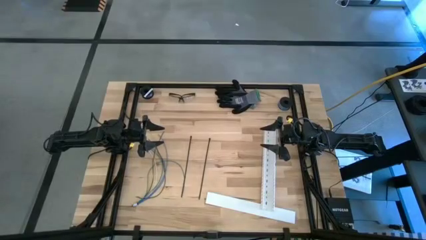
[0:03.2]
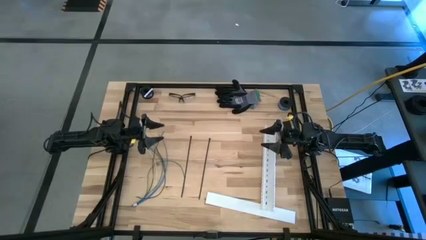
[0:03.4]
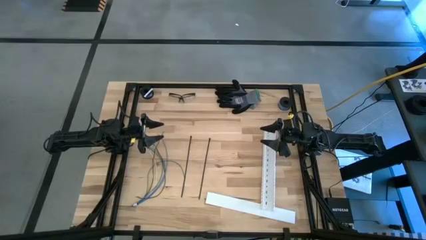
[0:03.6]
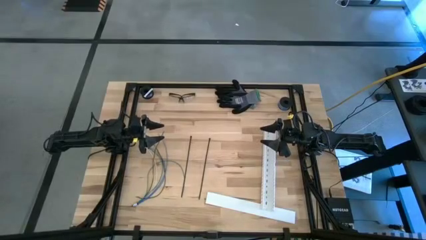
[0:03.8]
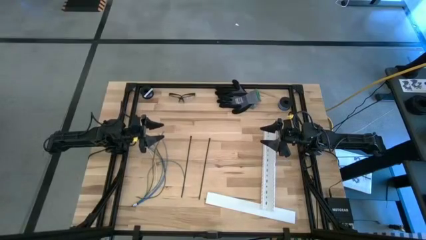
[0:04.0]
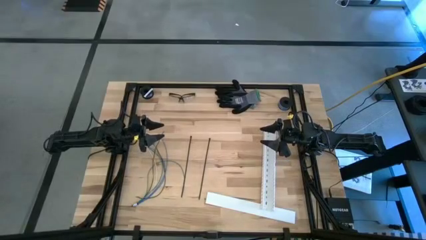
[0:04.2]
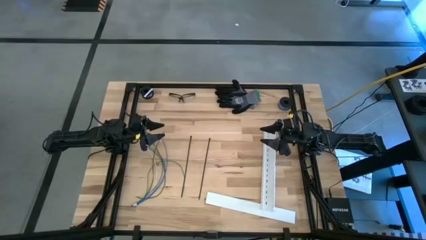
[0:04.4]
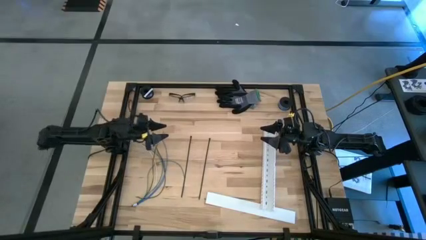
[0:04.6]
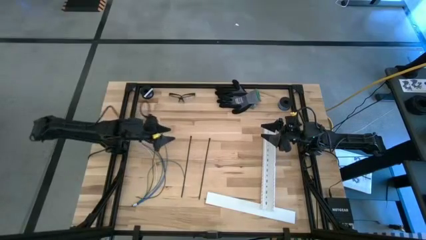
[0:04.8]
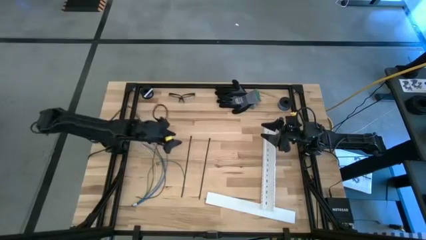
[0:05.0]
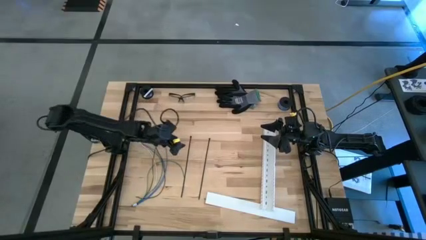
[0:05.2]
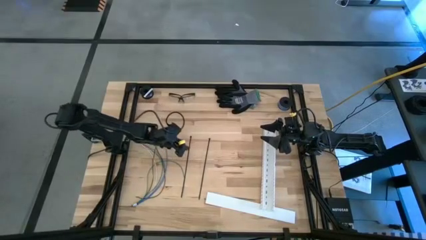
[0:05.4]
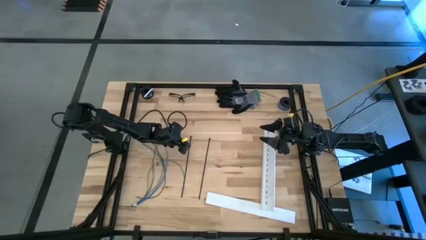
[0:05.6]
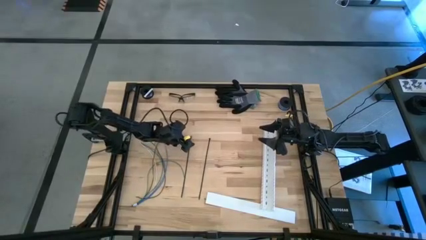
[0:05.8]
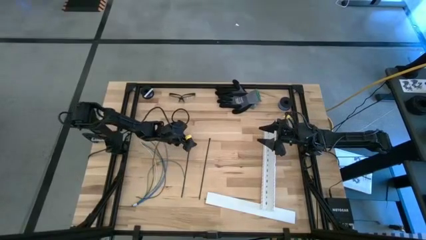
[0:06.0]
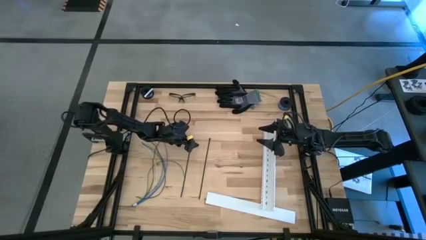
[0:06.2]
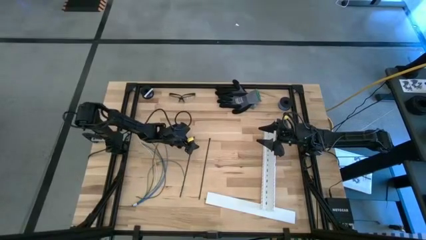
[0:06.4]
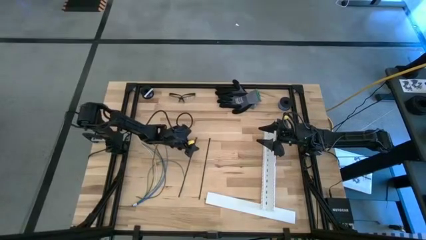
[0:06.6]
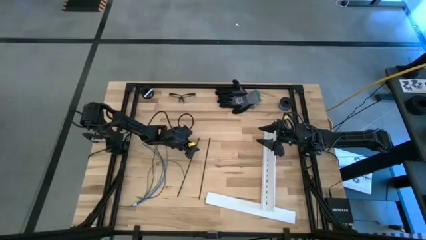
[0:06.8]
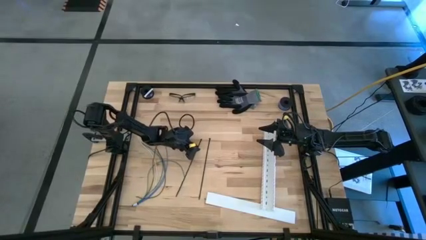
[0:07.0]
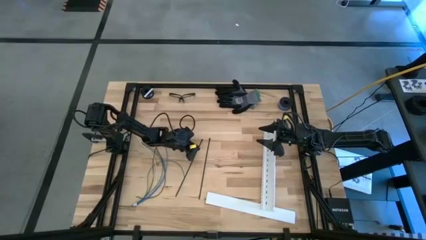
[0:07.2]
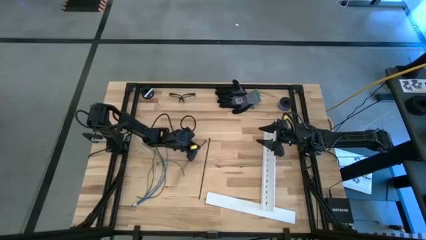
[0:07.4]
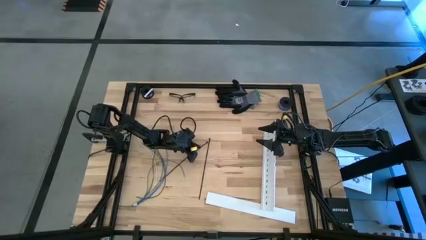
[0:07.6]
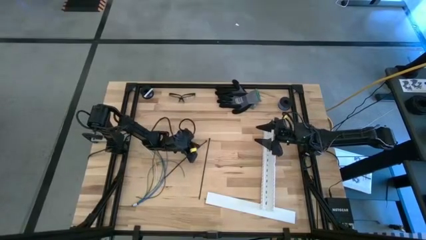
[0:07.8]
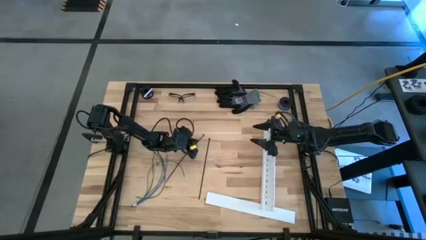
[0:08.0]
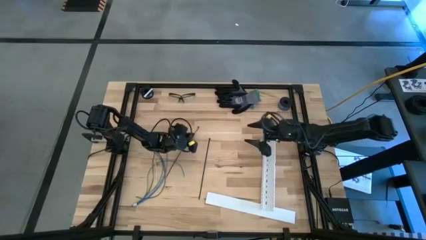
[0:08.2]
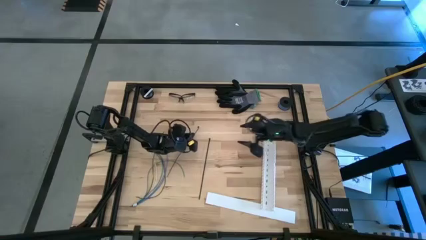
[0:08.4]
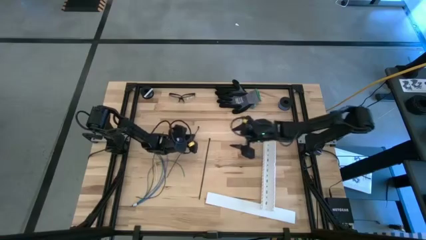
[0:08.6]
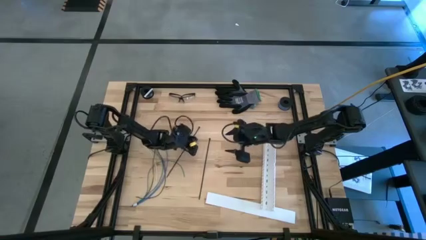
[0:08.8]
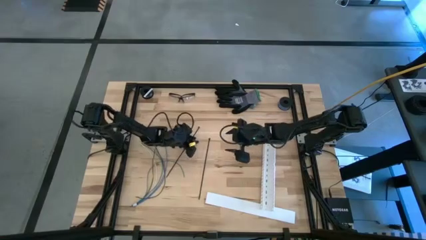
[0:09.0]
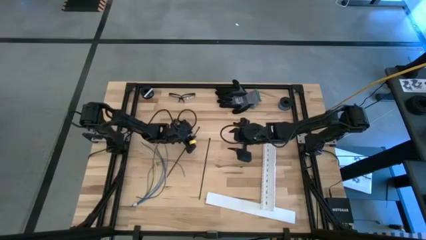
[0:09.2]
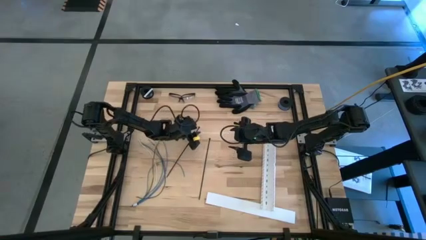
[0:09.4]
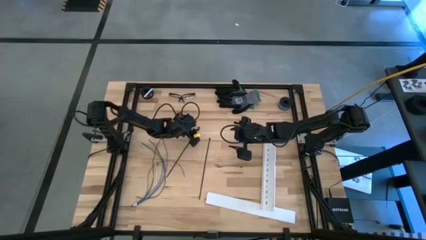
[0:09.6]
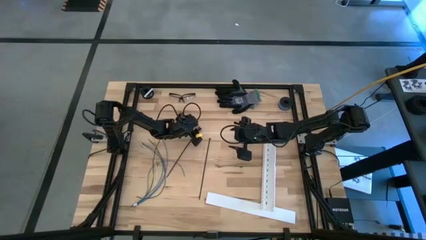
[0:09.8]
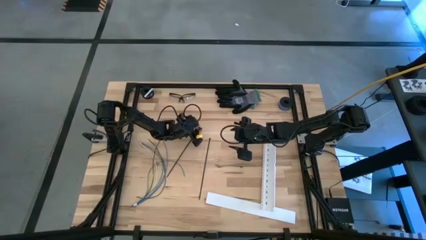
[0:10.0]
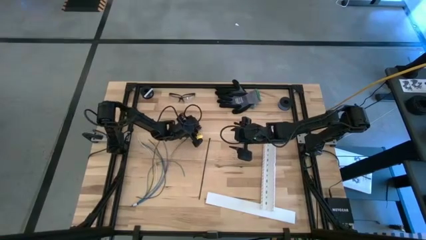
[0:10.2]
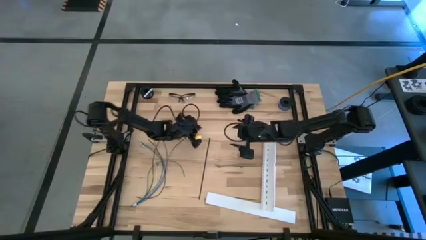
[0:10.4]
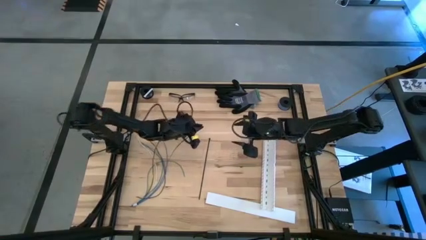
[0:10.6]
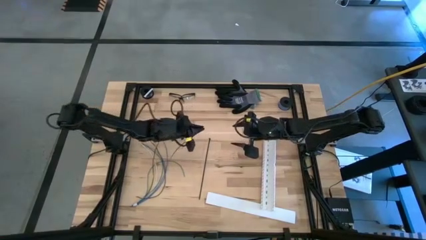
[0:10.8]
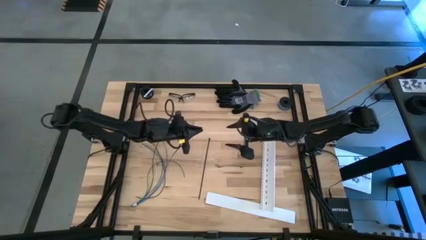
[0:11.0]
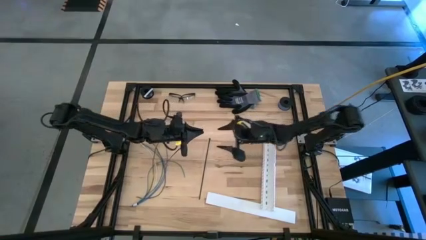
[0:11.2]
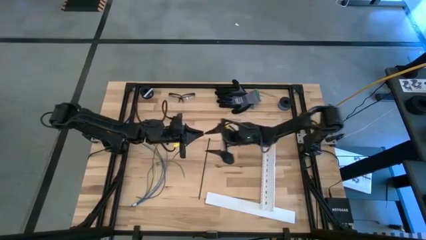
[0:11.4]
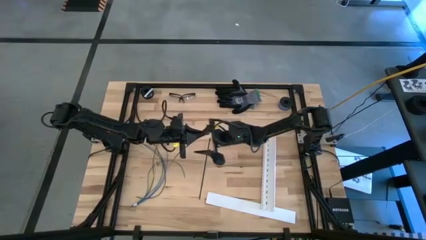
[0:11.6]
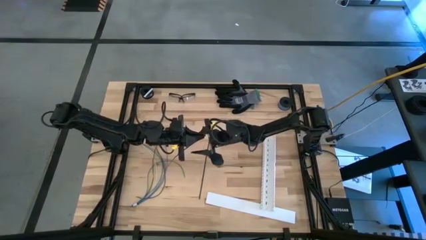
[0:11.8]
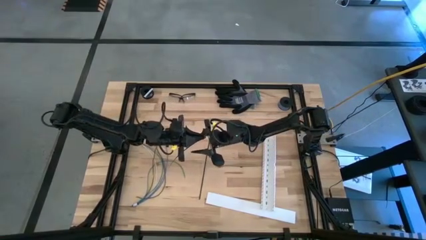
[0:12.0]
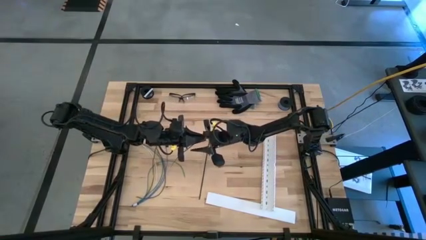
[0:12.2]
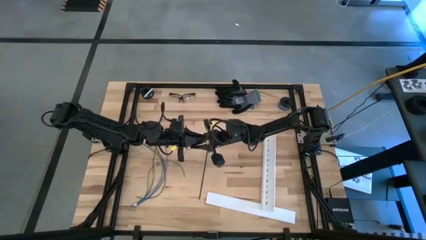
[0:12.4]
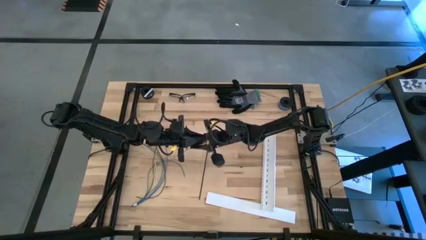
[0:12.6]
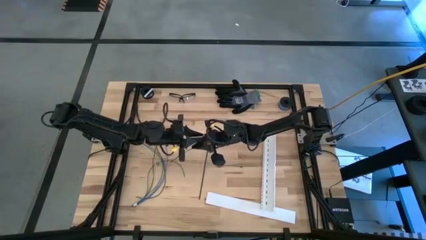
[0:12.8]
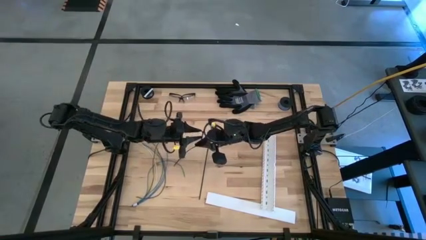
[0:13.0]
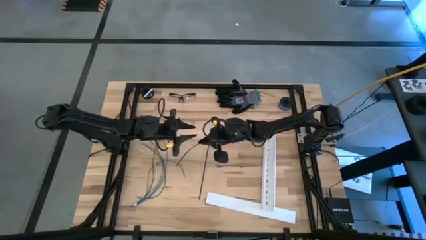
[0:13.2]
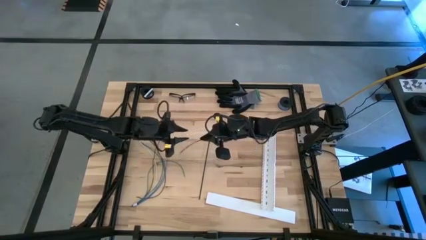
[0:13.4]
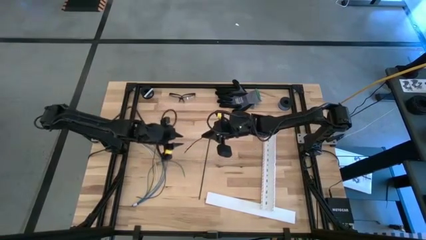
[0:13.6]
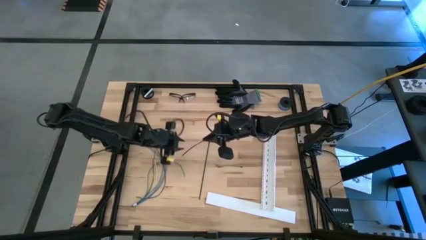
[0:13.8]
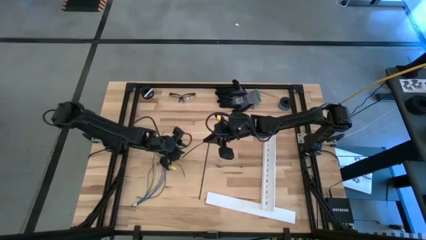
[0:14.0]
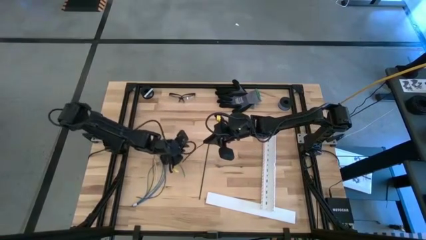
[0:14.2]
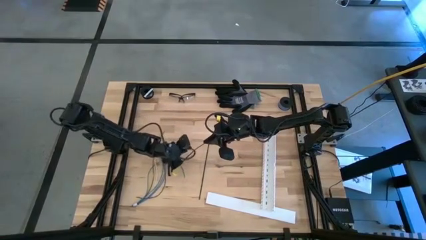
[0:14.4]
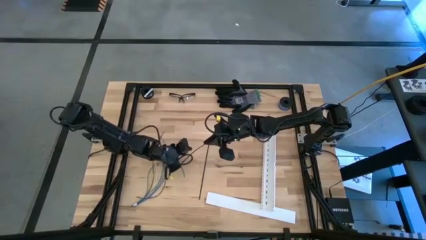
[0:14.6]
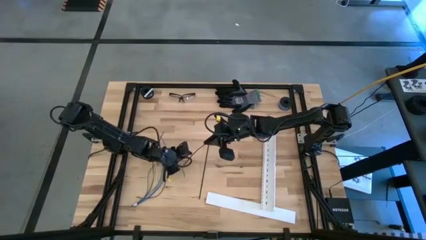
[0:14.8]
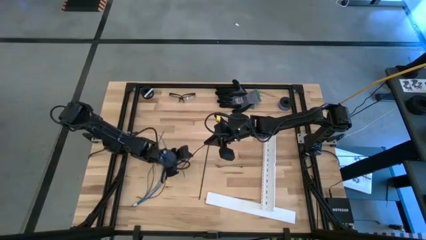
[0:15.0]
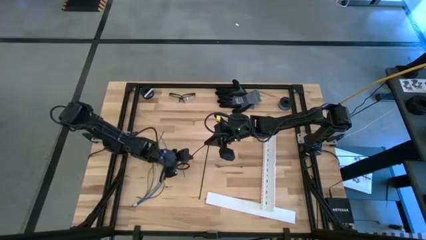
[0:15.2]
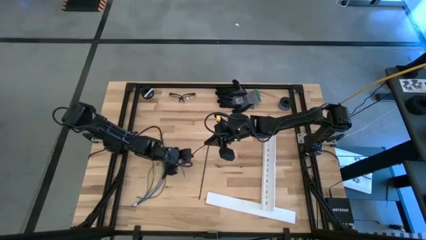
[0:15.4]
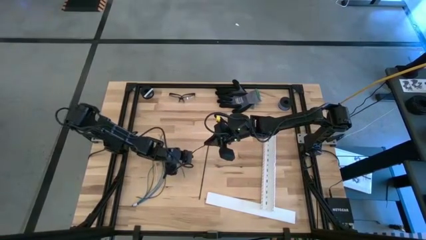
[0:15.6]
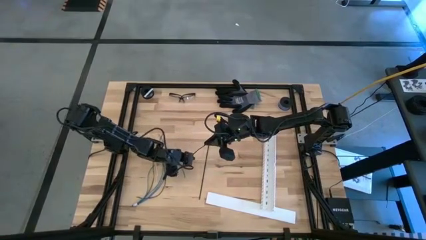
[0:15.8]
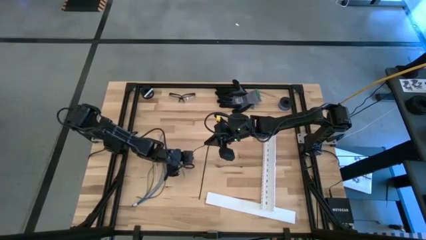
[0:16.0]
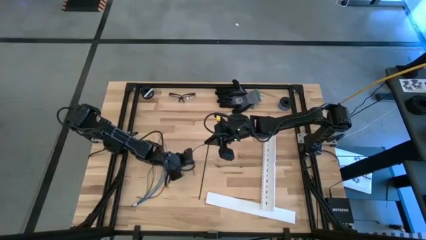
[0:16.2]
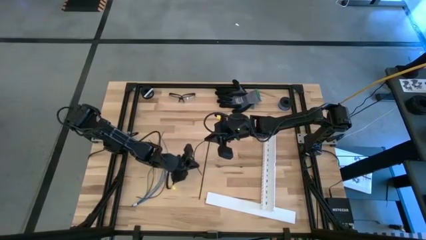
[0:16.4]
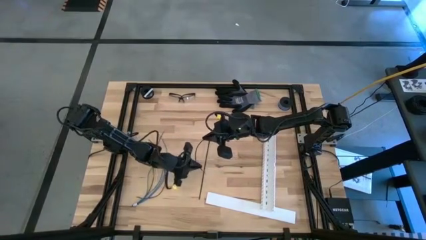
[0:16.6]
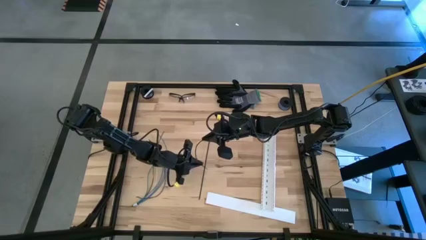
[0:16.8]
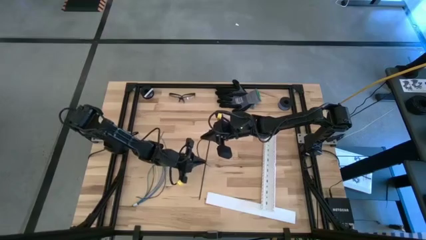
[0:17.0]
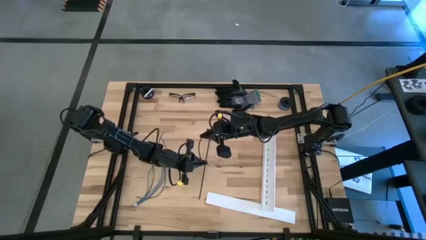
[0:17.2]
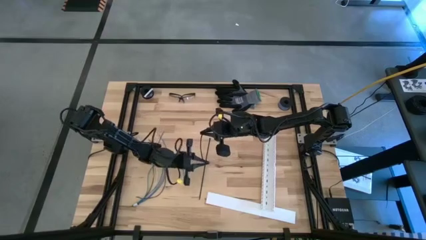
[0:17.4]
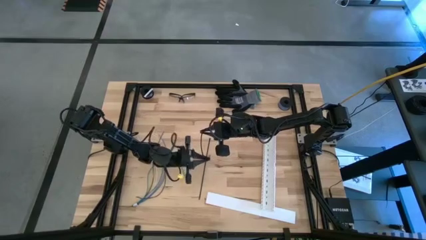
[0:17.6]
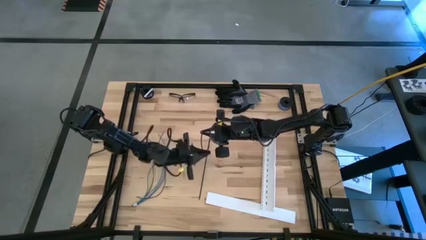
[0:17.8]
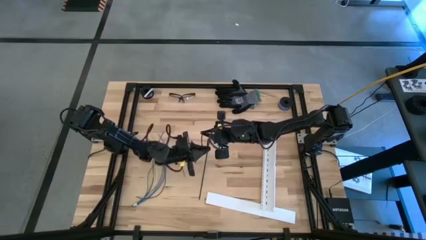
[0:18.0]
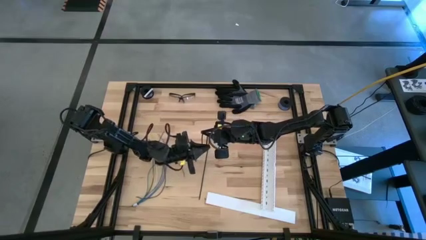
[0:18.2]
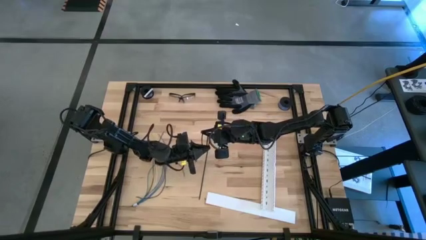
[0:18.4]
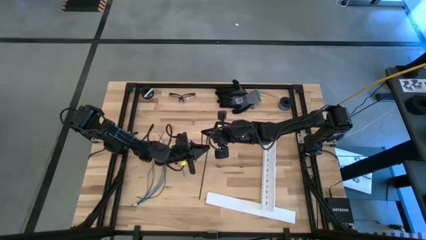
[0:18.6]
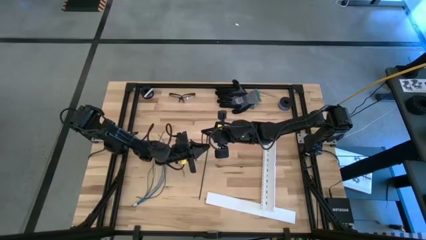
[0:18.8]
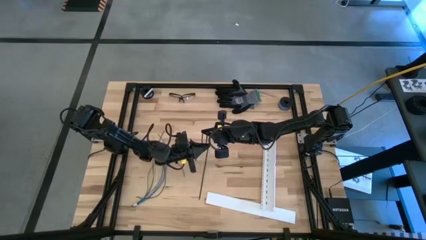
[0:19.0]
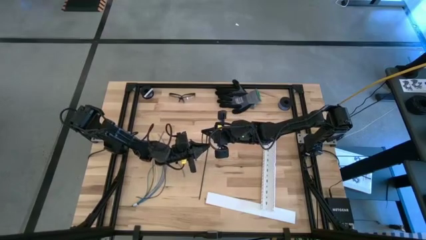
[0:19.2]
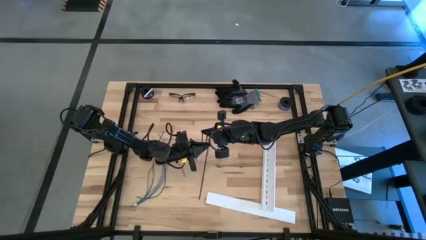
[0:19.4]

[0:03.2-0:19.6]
Task: Ziptie cables
Wrap the cable wires with the black zip tie
